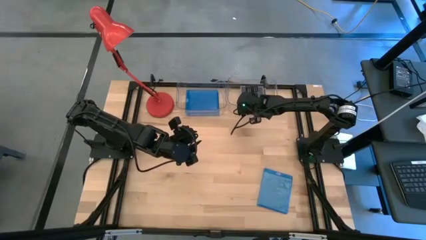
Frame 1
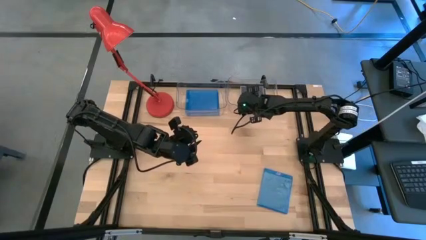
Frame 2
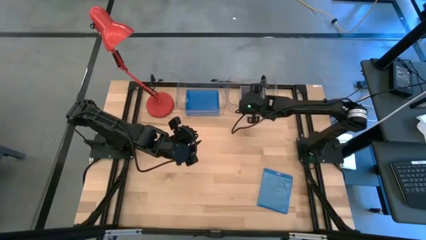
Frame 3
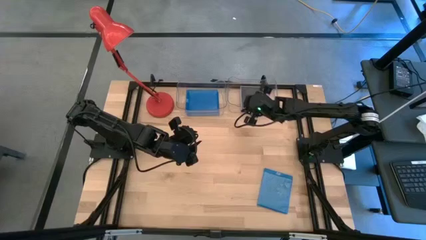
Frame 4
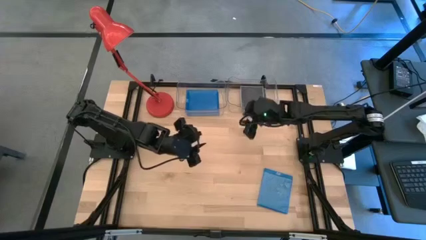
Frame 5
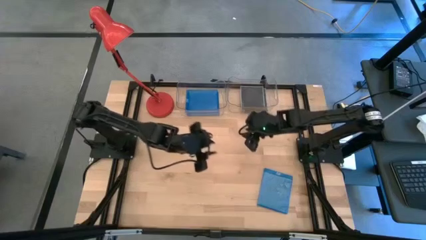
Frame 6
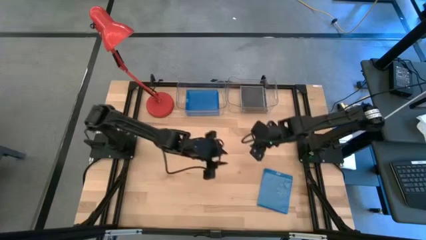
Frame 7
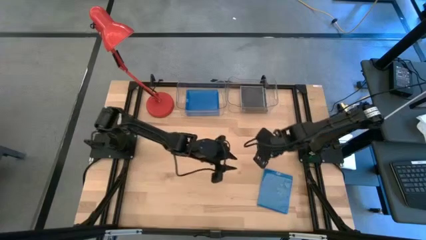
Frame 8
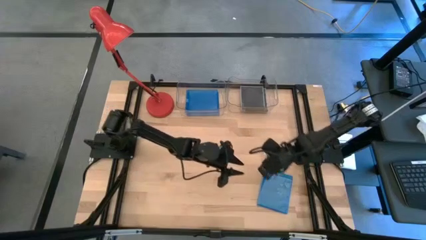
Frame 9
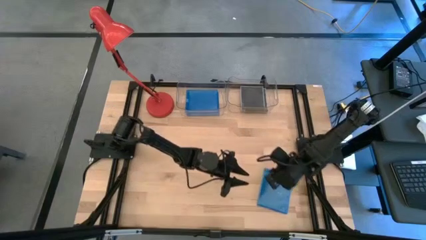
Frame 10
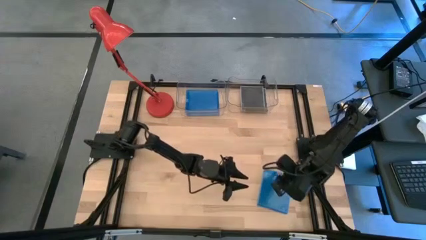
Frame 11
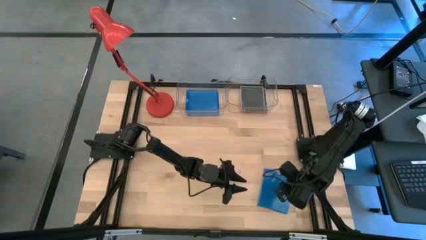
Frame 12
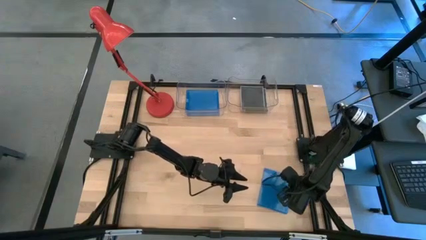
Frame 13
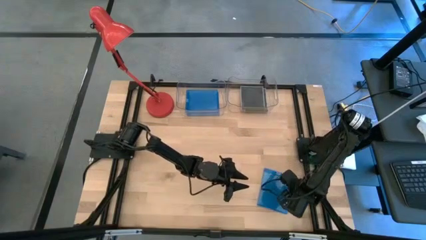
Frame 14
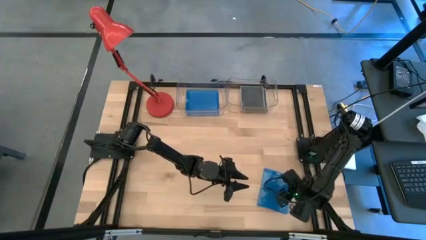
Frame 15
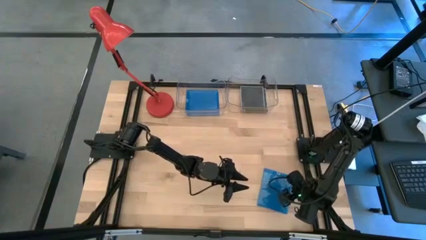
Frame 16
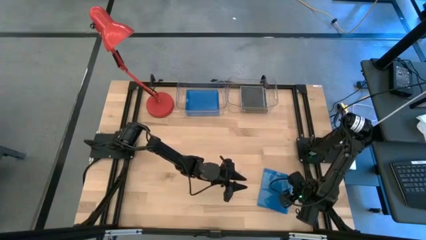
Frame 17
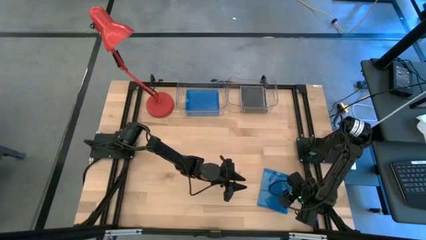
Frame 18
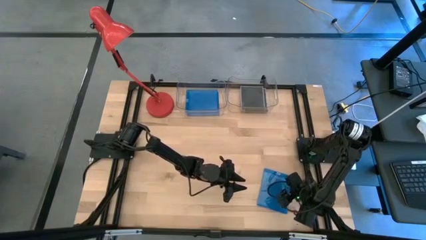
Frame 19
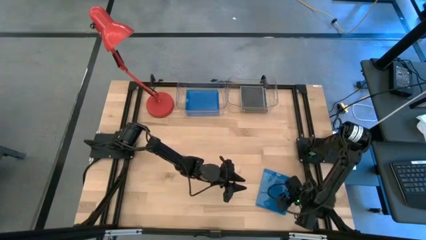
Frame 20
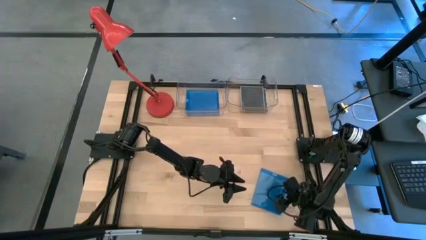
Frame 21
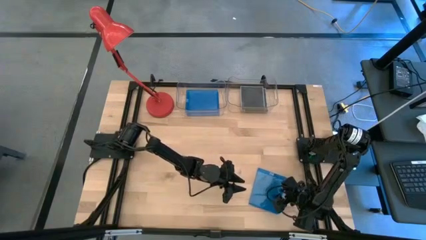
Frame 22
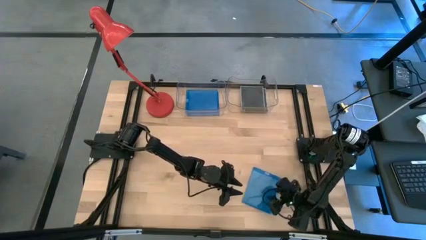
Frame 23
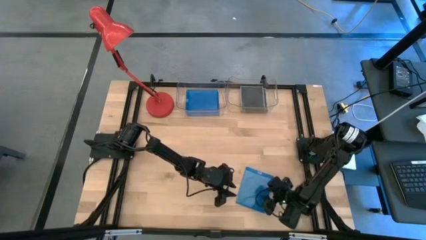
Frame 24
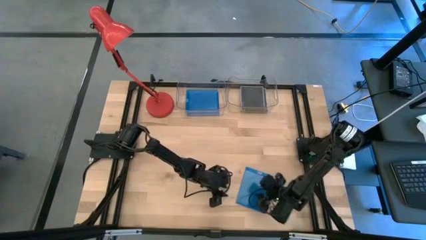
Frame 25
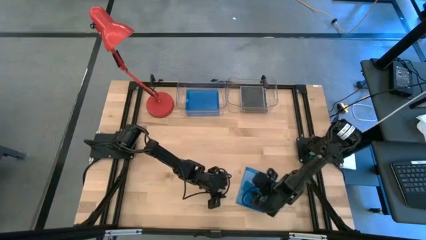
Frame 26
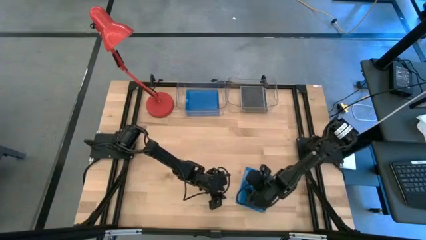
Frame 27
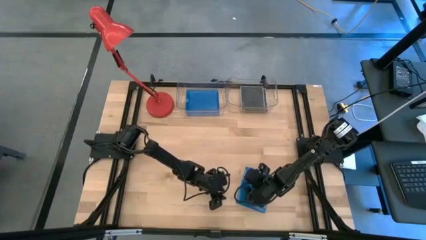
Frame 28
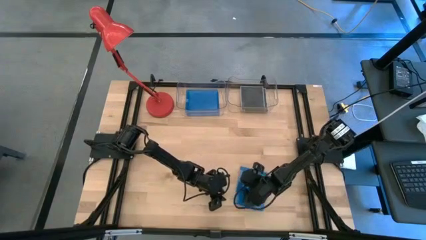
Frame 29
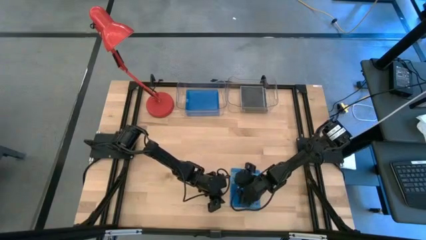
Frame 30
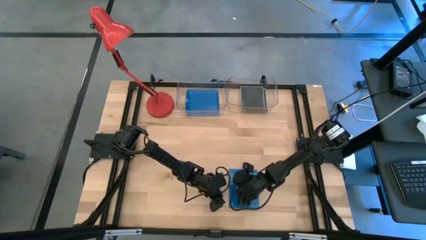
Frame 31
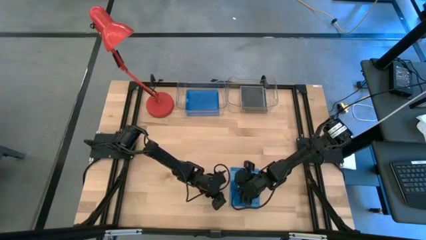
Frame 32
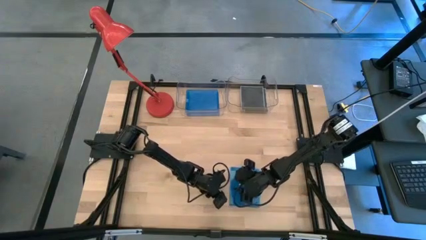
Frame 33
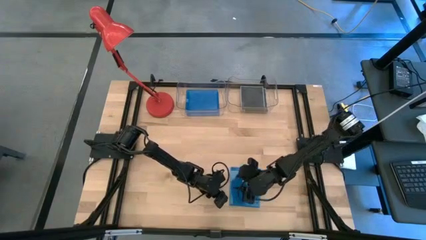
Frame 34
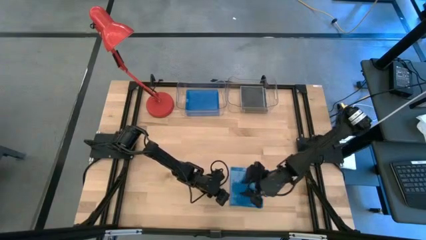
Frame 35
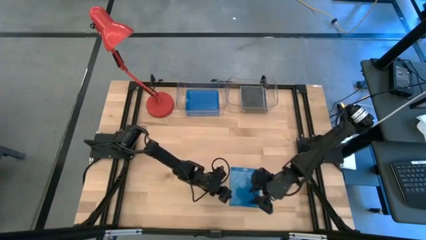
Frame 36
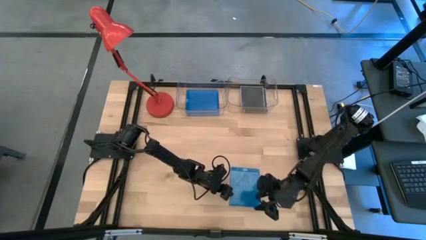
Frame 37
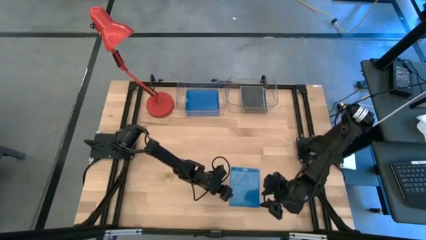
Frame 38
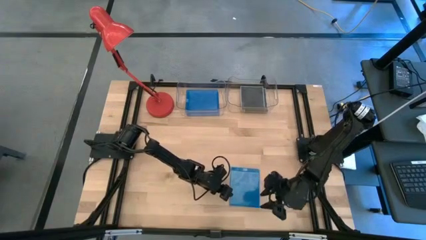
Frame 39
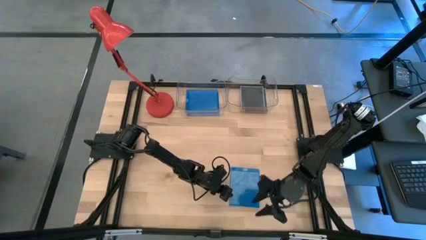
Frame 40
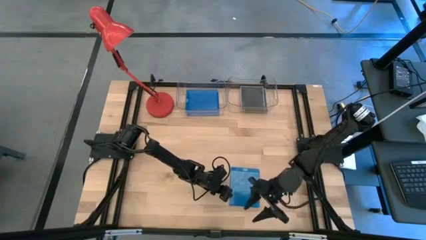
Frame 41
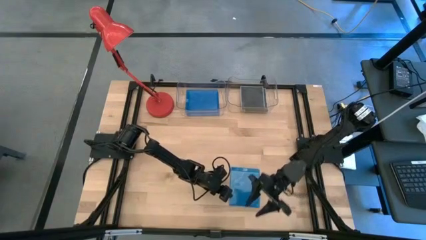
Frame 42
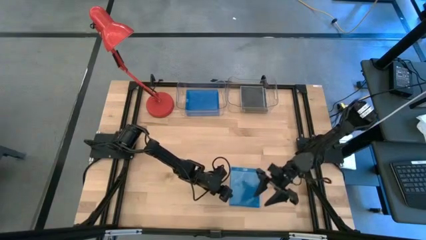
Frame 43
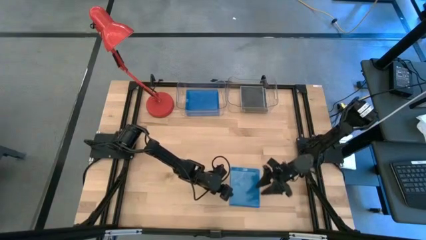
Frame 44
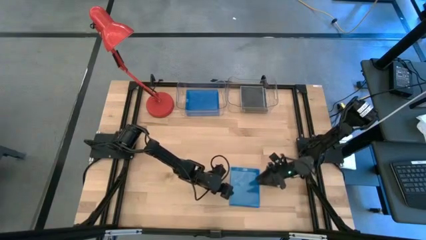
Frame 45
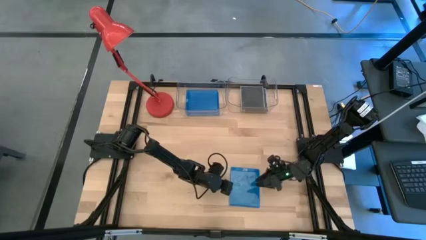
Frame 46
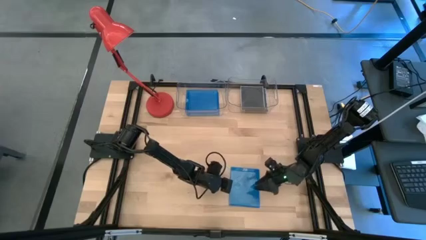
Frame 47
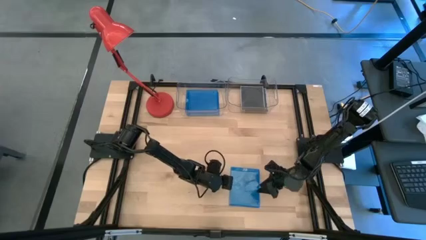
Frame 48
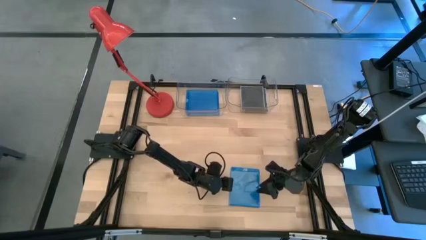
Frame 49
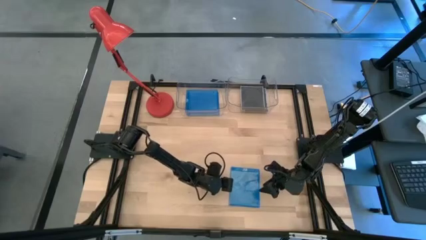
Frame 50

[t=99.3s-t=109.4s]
Task: Pick & place jewel cases by type
Put the blue cd case into the left transparent bin

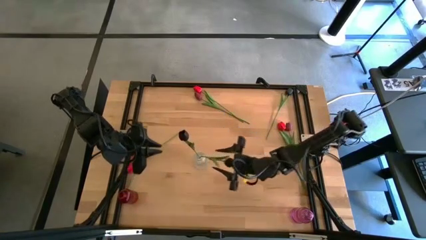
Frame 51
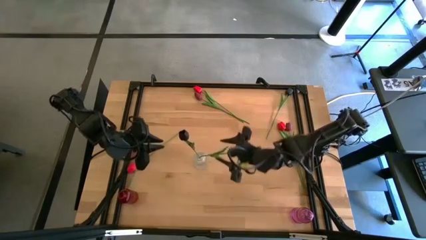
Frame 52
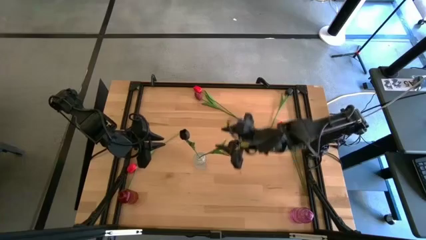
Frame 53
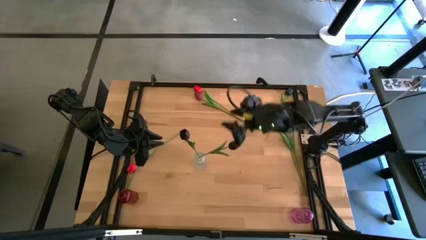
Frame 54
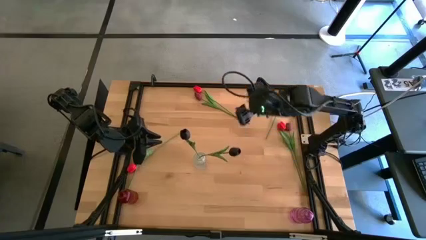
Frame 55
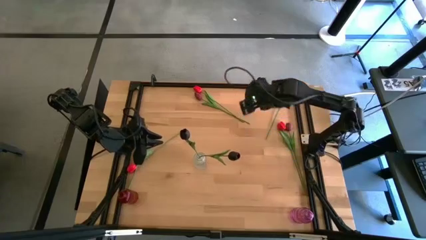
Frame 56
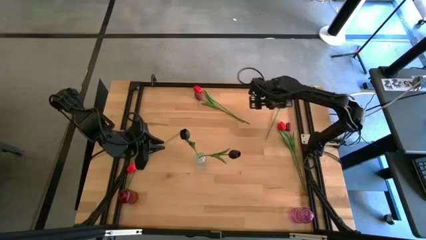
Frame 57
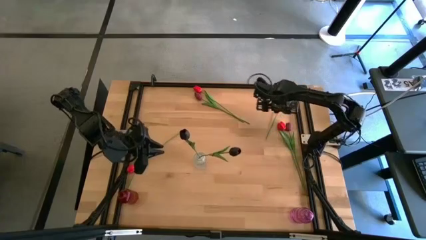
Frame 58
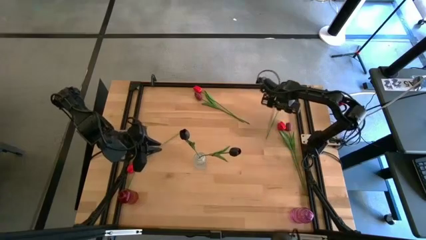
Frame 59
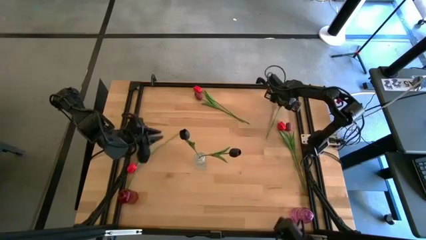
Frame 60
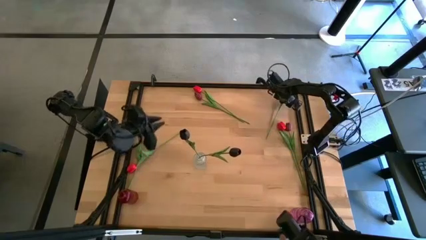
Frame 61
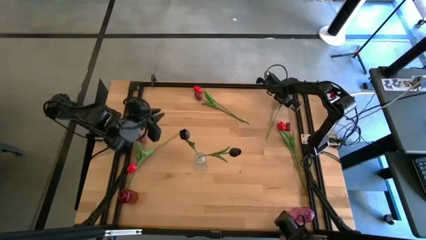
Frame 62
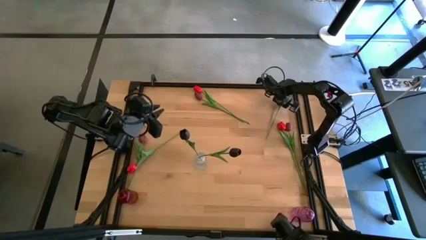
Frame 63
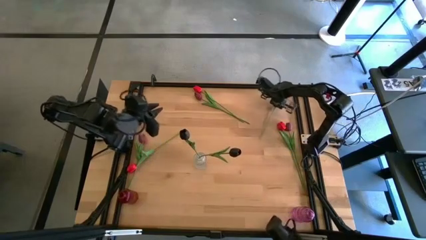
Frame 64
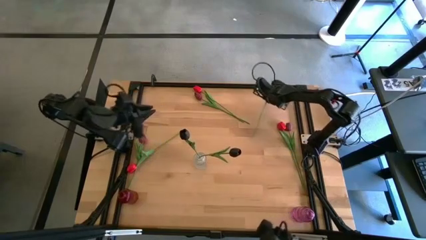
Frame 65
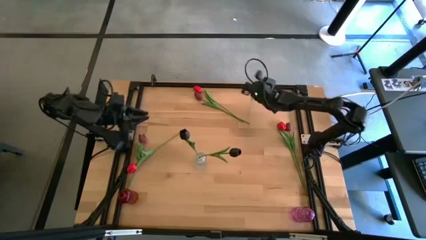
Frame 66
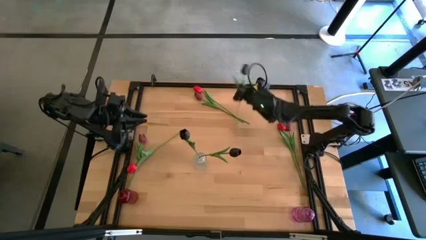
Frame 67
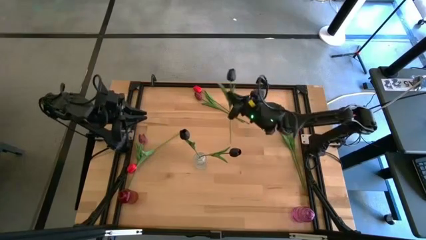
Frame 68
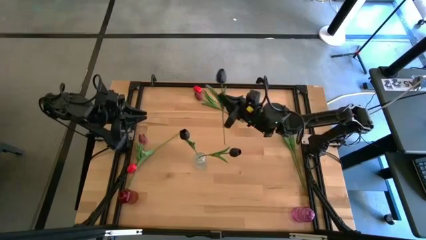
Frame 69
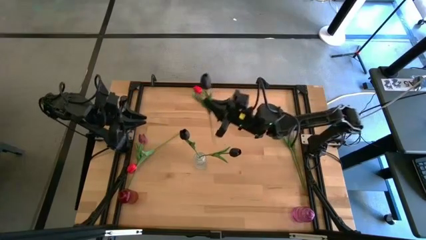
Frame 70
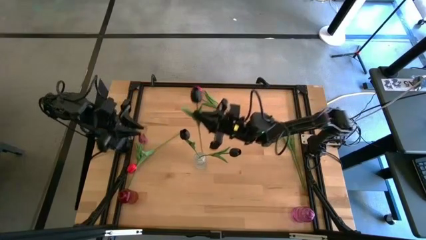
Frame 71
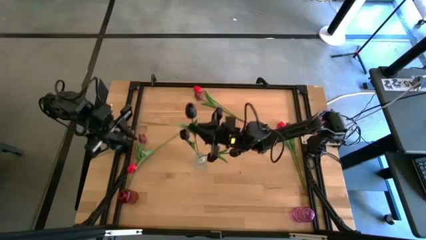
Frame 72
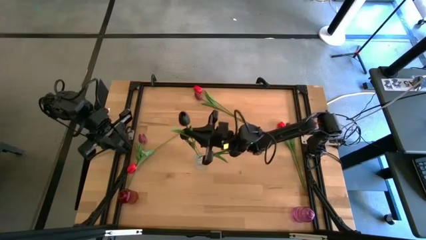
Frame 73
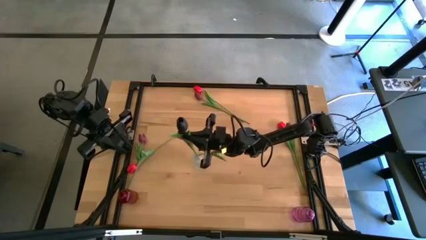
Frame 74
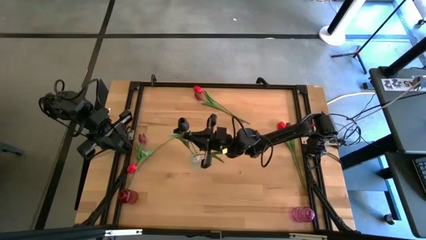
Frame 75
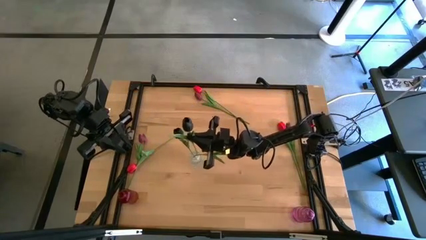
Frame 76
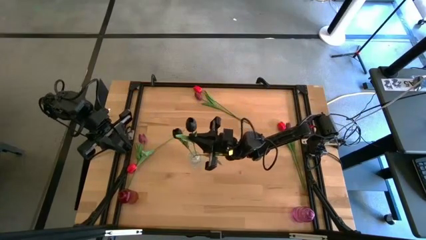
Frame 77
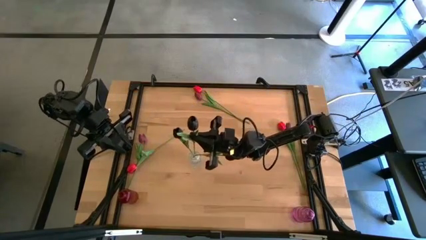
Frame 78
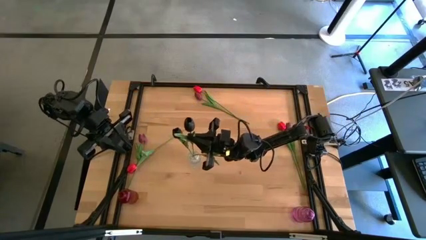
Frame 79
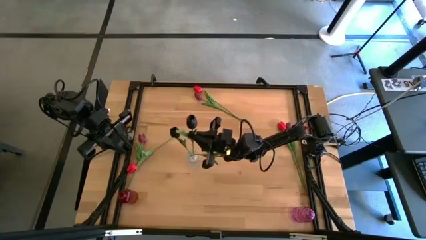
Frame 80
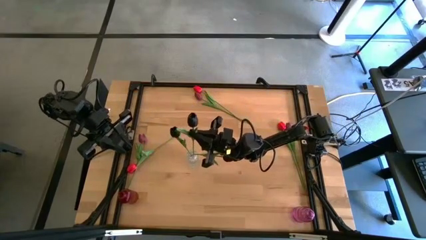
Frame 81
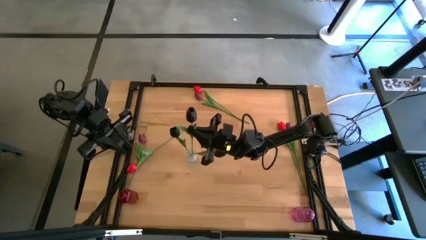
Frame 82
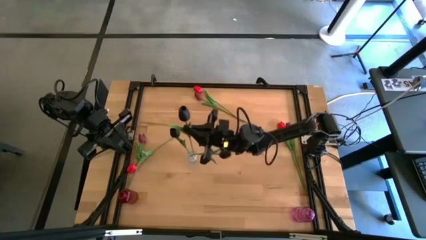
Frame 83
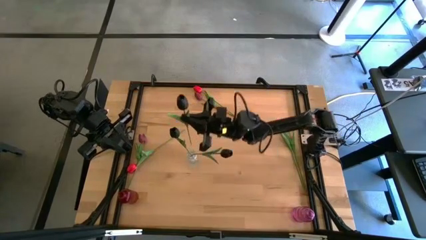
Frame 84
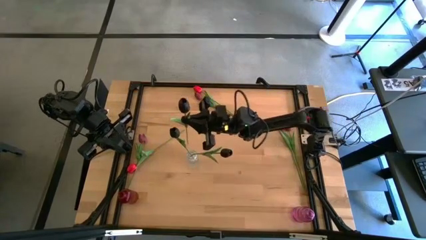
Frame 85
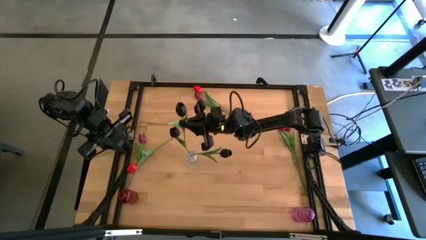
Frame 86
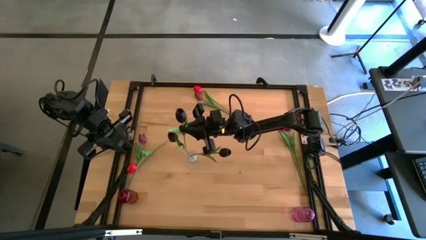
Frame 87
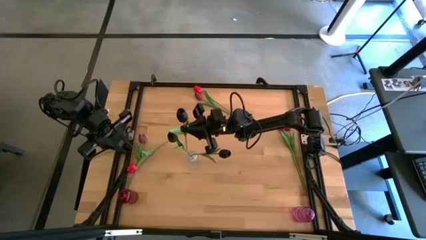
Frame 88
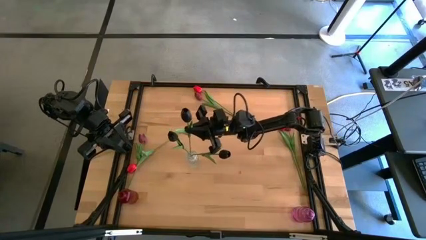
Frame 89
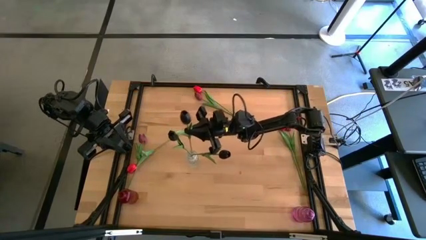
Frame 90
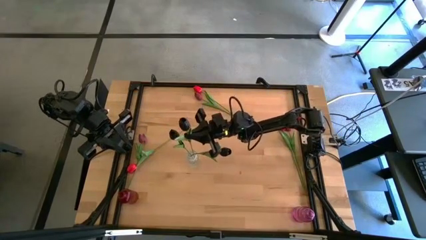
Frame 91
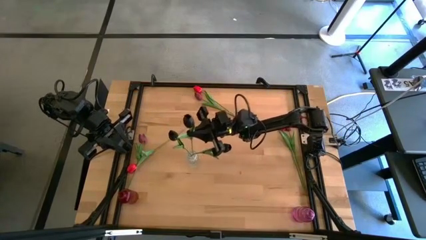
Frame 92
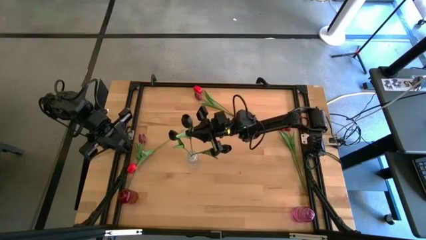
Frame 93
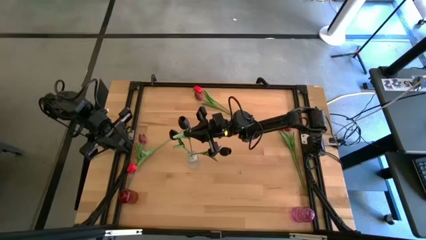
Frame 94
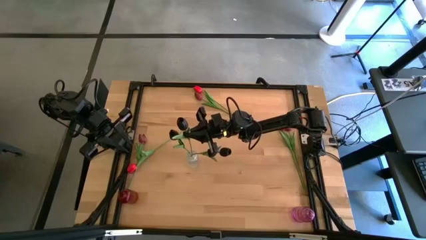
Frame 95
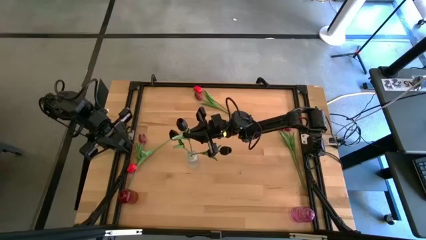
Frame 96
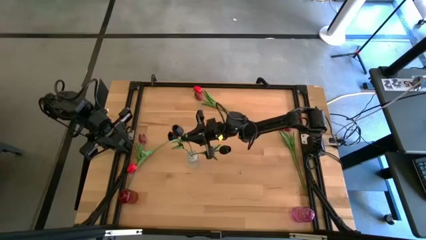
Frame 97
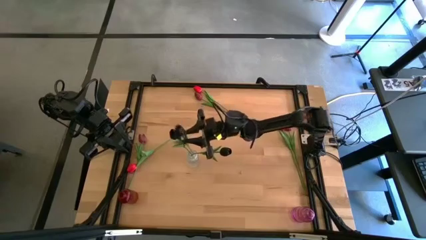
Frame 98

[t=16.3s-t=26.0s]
Task: Sort flowers into vase by color
Put the black flower into the transparent vase
